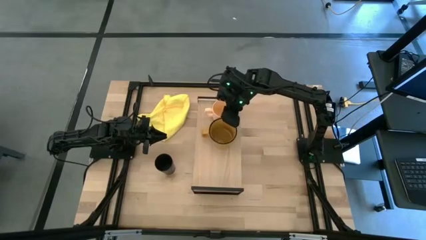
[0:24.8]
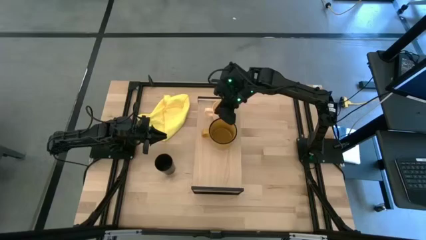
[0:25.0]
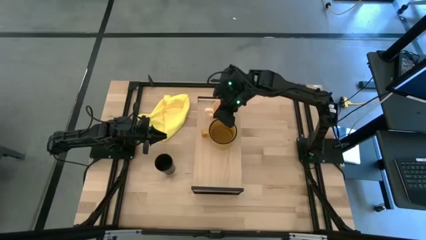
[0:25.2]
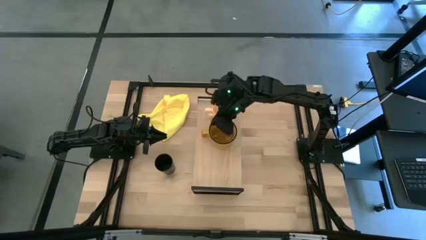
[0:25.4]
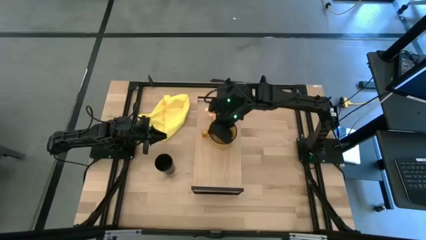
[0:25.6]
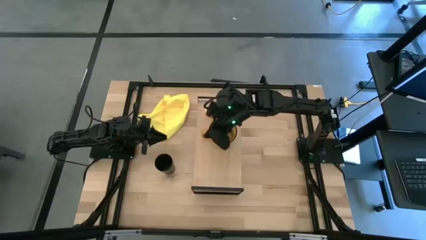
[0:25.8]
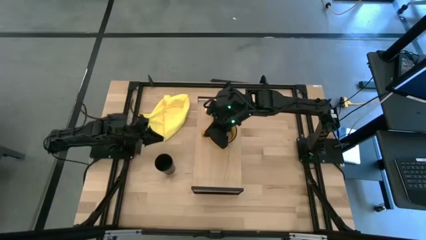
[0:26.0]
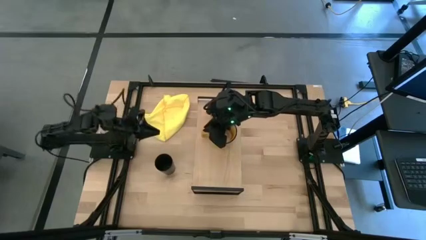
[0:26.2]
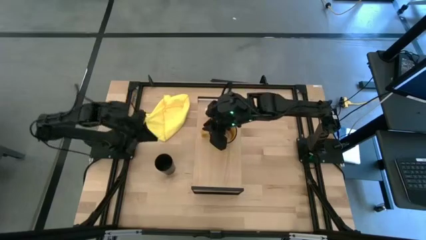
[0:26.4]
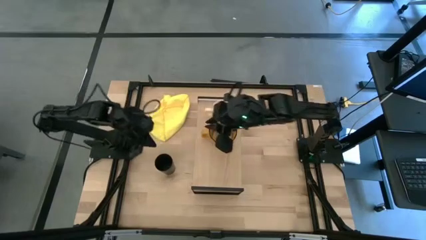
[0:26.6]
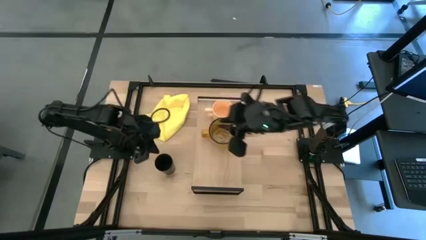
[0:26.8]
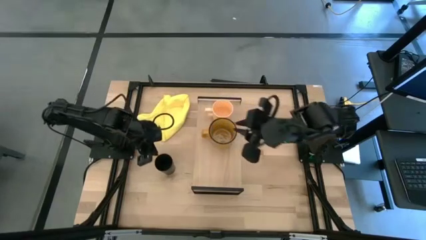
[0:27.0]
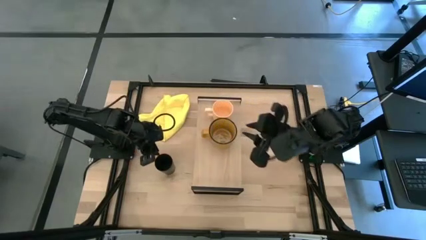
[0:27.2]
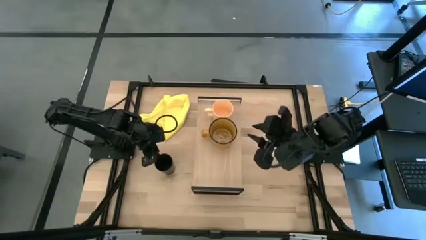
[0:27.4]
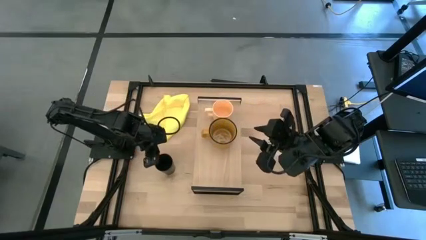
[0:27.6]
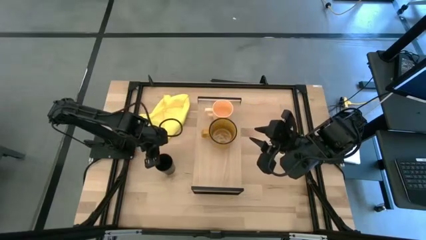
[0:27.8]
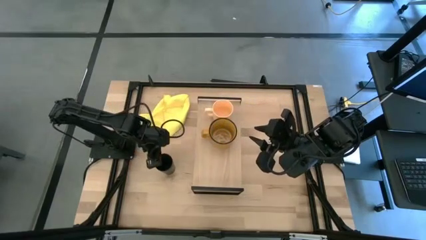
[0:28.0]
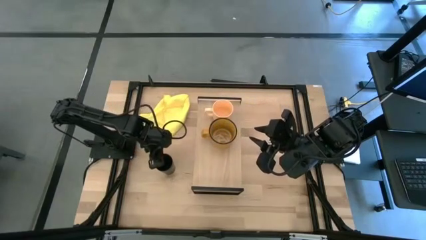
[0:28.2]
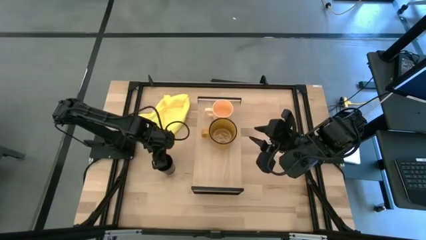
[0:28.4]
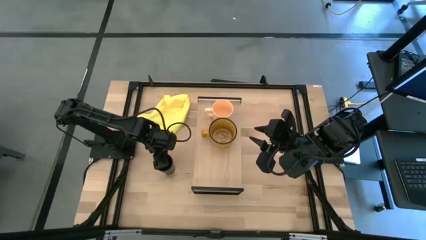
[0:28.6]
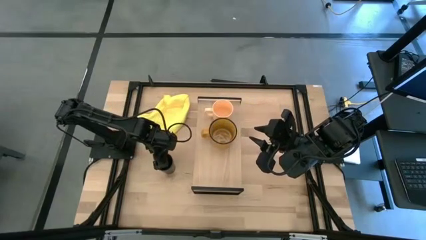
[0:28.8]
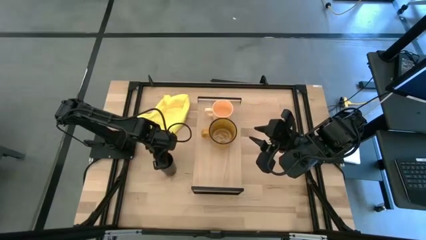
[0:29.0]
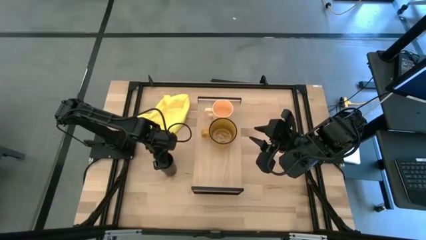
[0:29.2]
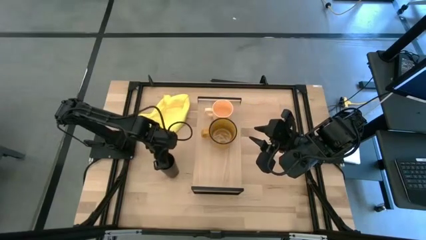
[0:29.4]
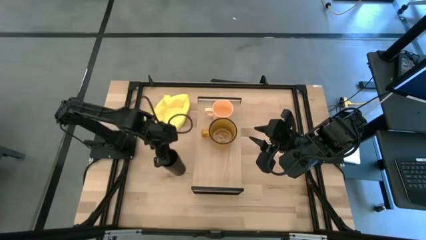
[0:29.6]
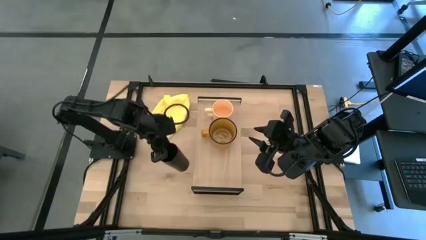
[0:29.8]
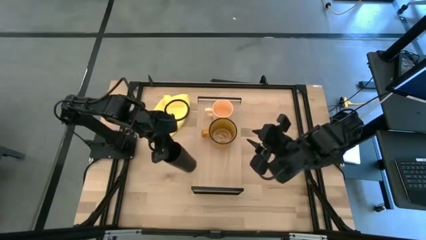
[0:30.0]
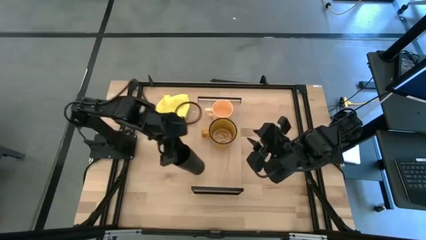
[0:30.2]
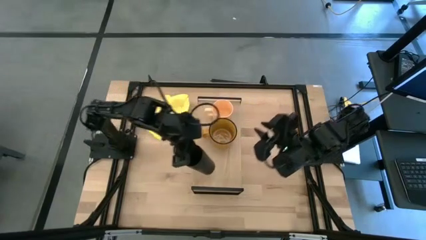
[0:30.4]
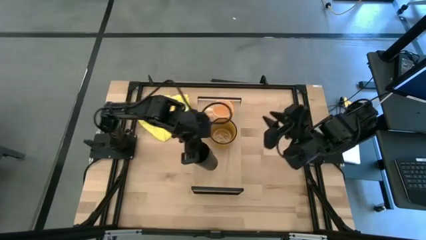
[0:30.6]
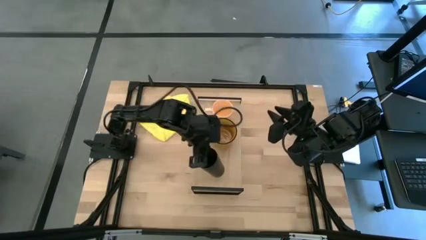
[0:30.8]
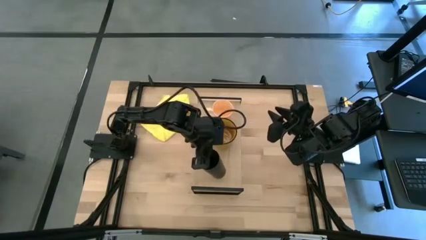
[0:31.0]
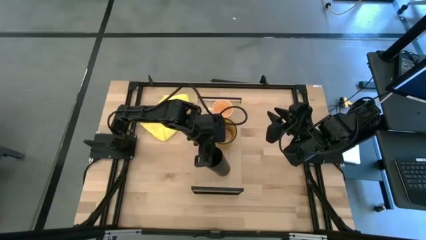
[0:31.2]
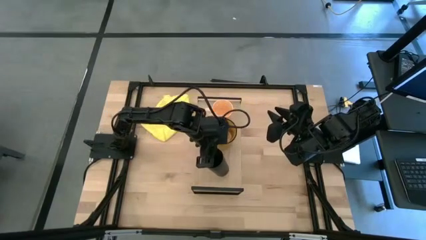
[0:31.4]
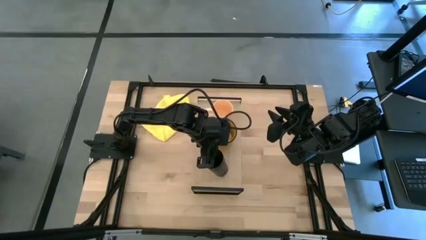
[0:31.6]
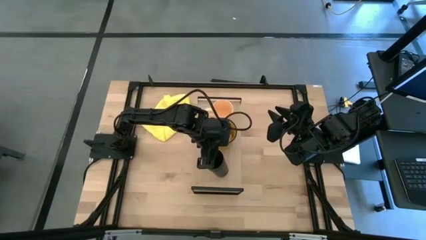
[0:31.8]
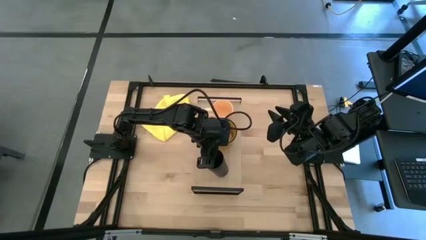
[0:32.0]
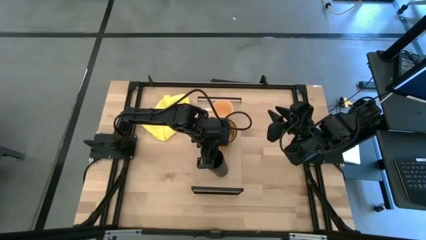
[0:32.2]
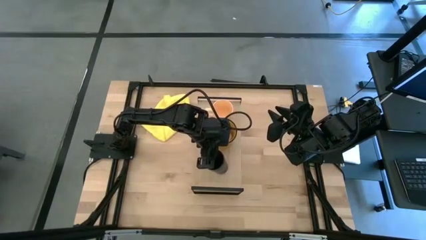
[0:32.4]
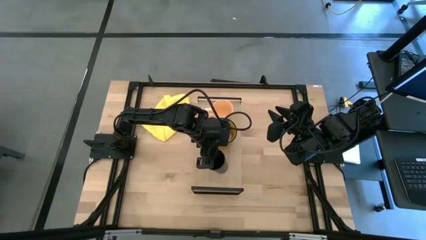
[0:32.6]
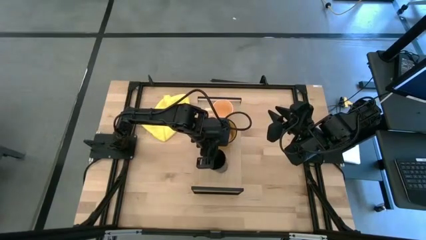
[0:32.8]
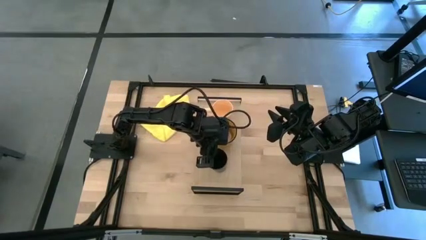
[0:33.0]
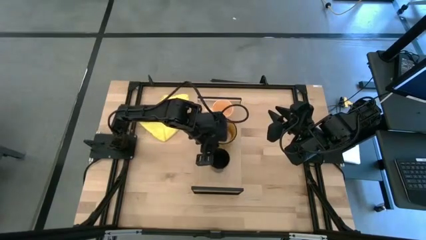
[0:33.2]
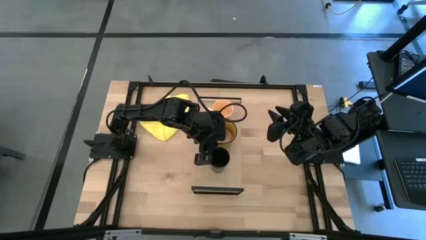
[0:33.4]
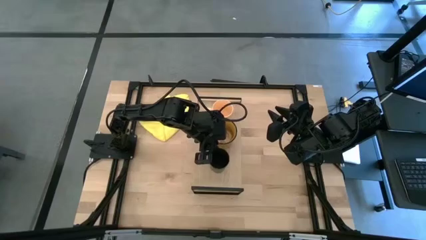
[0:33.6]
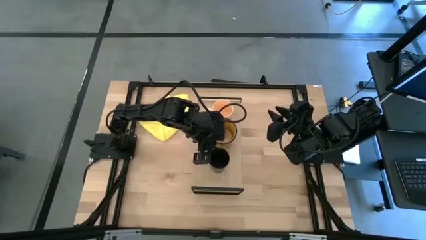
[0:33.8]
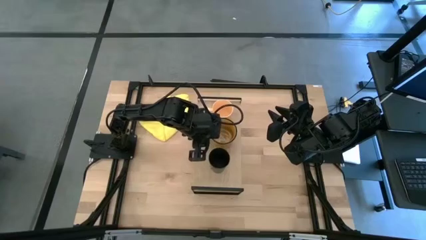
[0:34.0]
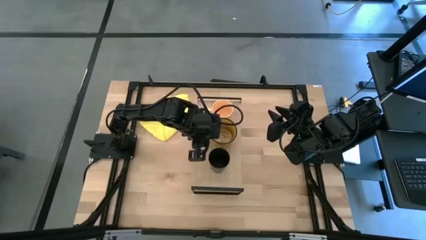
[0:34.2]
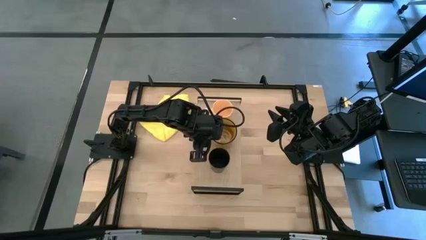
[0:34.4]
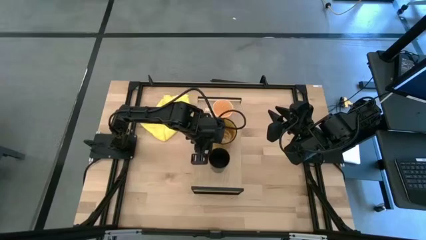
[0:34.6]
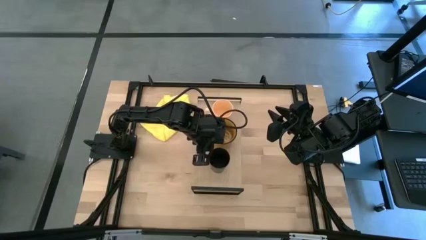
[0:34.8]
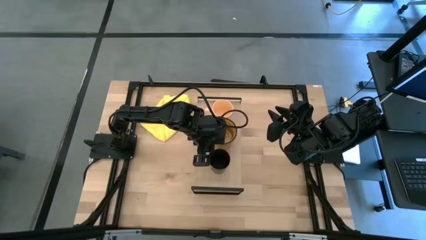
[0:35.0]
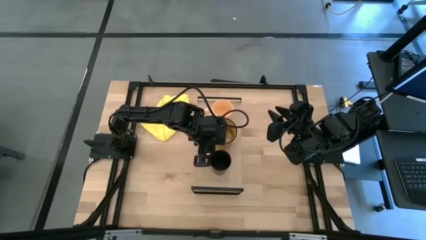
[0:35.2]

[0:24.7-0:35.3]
Task: Stack small to large cups/mugs on shelf
Put the black cup on the shelf

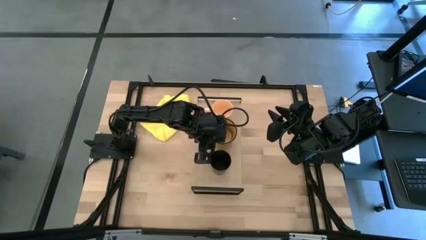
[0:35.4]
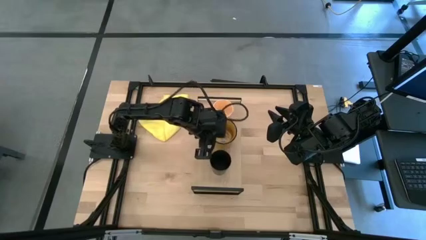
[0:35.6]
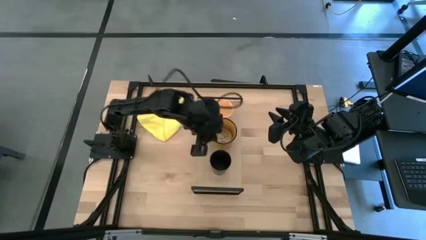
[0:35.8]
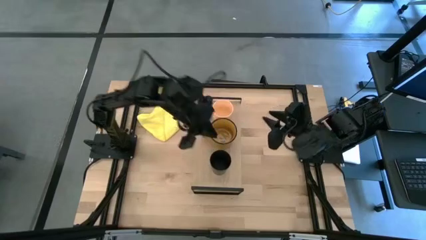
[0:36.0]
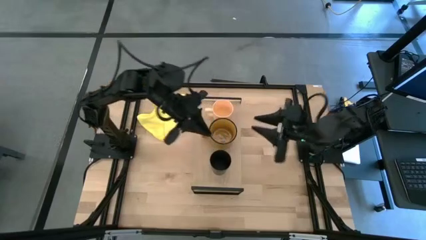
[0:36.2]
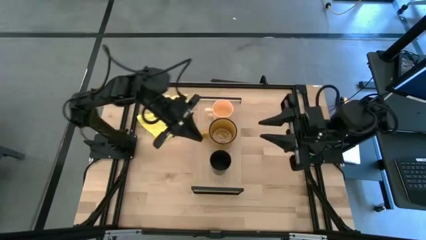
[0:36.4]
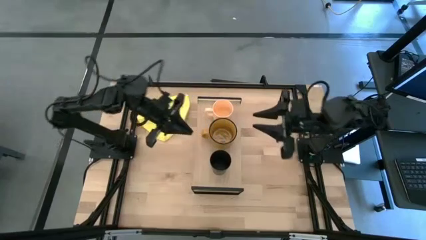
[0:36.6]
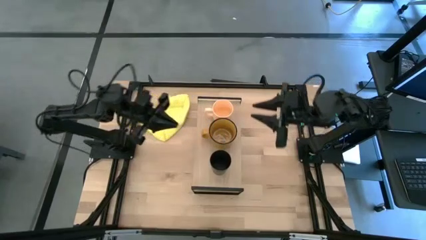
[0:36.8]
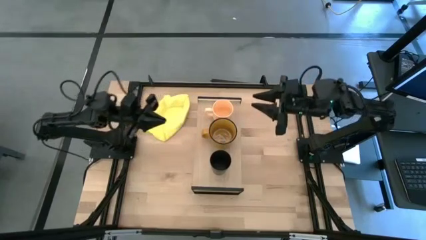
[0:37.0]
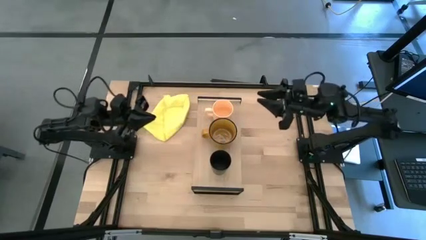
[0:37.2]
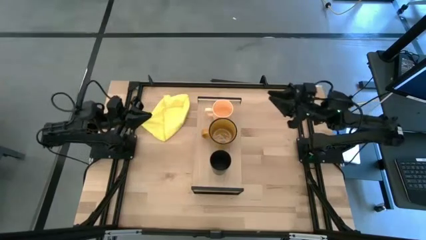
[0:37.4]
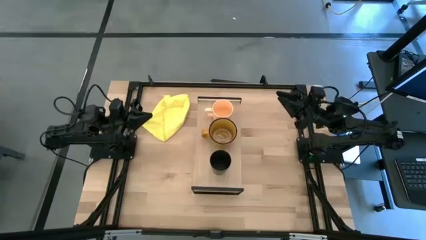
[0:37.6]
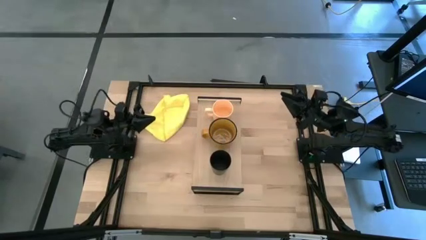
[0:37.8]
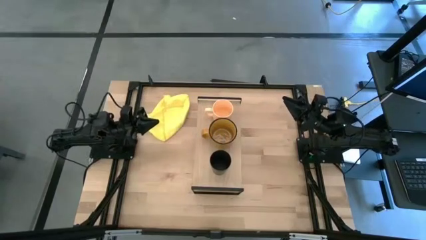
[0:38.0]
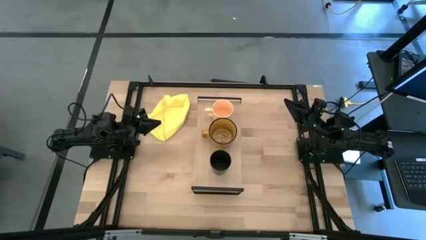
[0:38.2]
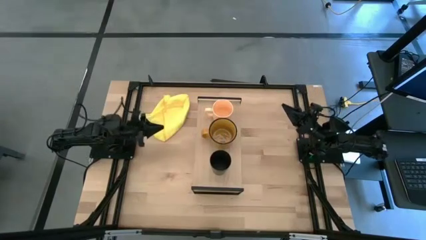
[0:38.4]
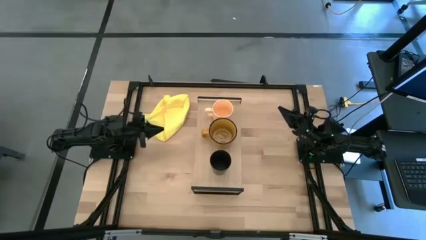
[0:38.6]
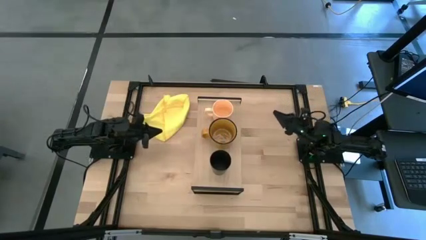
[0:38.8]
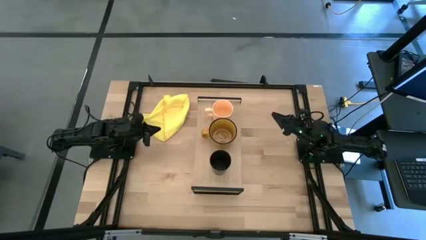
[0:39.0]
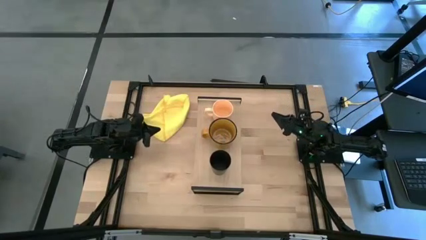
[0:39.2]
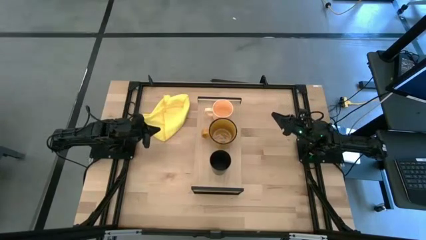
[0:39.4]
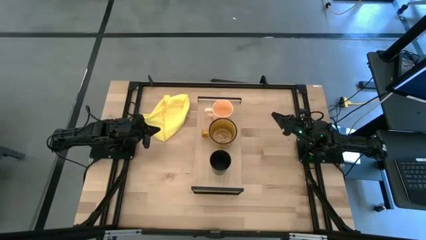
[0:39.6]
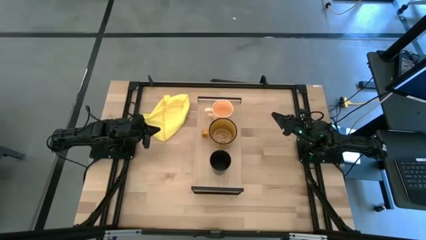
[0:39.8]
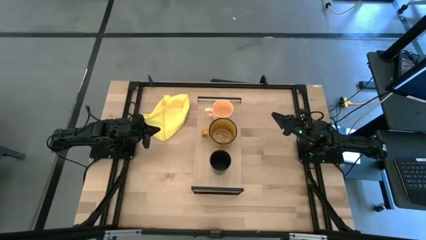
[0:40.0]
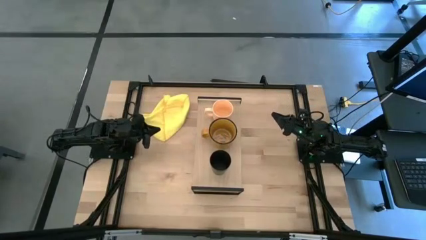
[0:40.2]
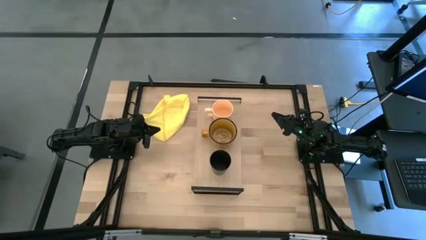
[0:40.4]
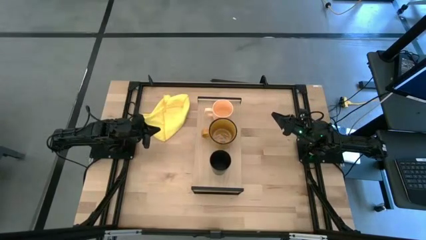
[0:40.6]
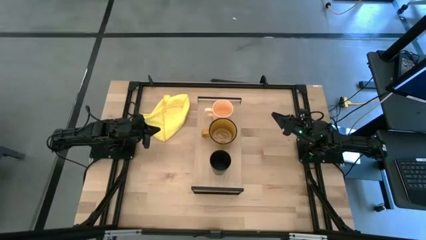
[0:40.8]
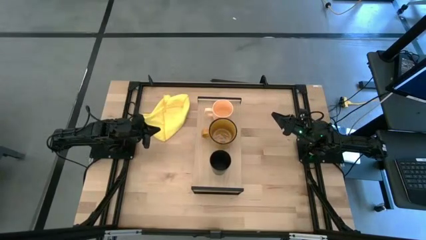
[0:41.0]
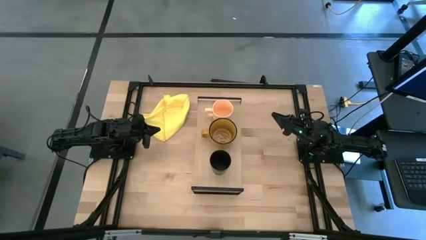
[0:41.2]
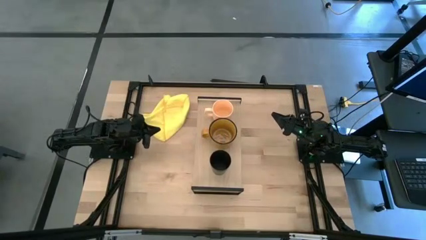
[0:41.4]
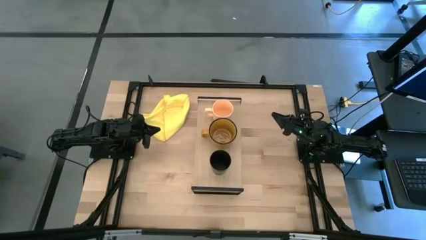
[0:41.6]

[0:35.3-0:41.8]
Return to Home Position

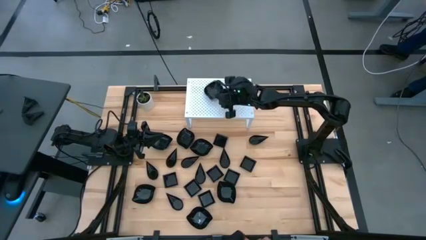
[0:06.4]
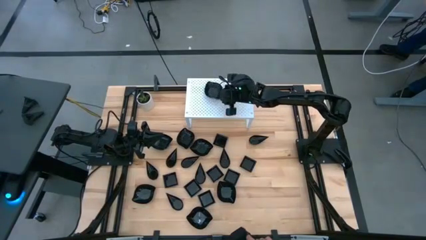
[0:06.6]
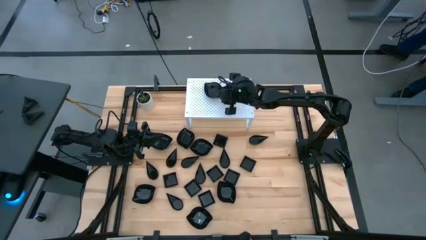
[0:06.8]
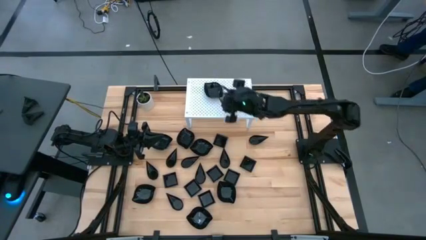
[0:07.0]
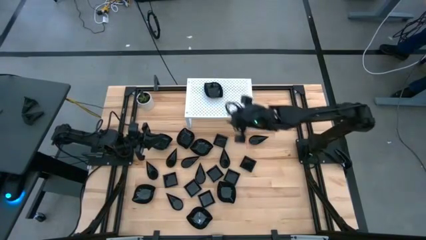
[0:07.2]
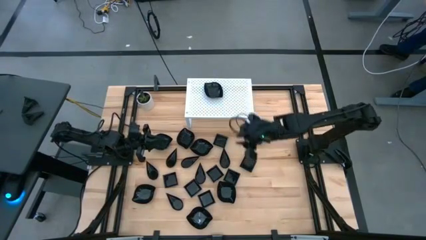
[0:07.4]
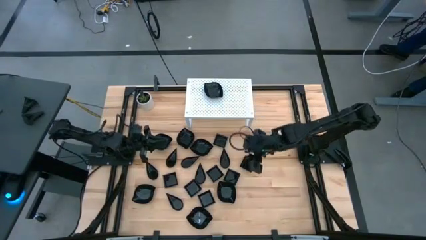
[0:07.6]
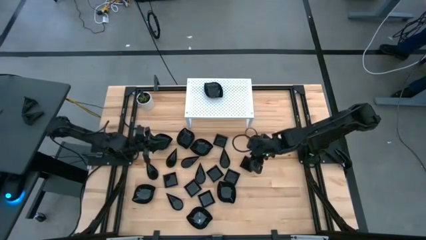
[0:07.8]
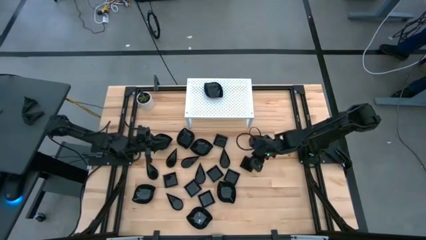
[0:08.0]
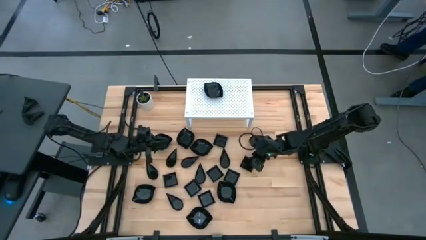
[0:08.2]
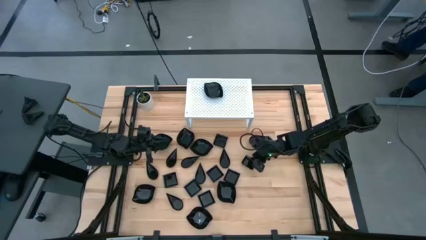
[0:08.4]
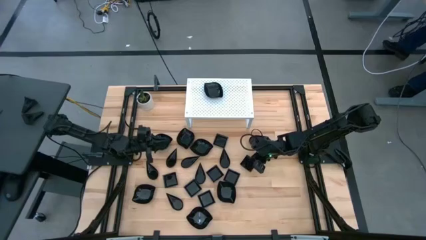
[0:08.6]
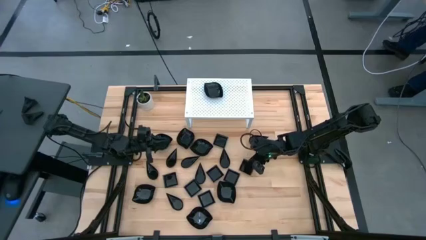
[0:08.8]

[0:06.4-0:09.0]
Task: Pick & Place Mini shaped plates
Put the black square plate on the shelf
